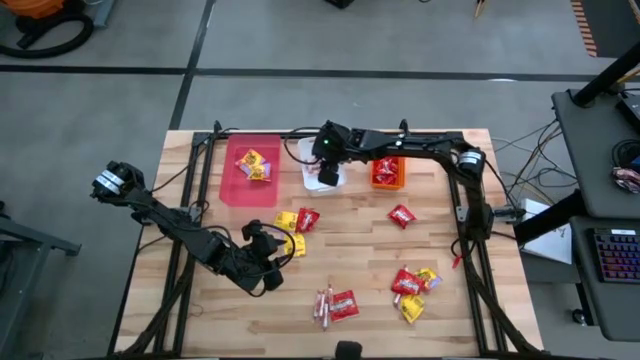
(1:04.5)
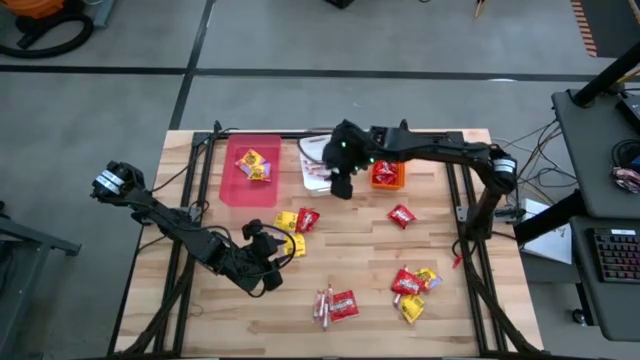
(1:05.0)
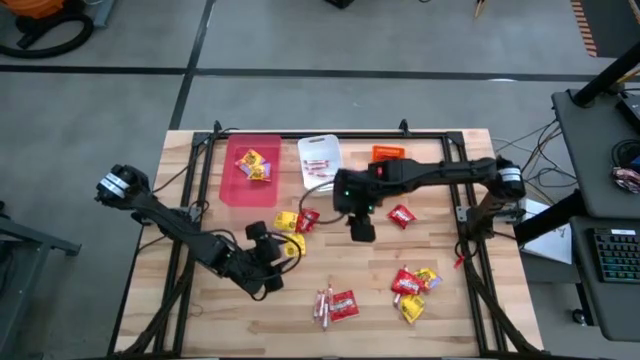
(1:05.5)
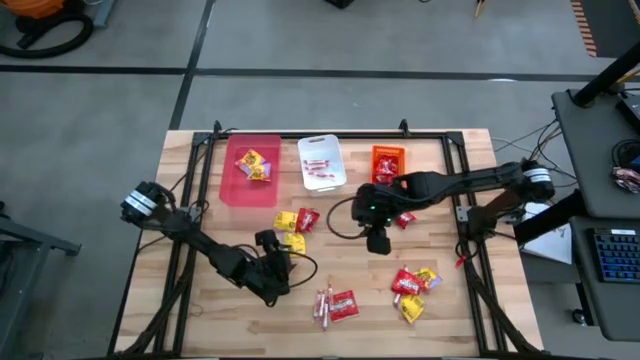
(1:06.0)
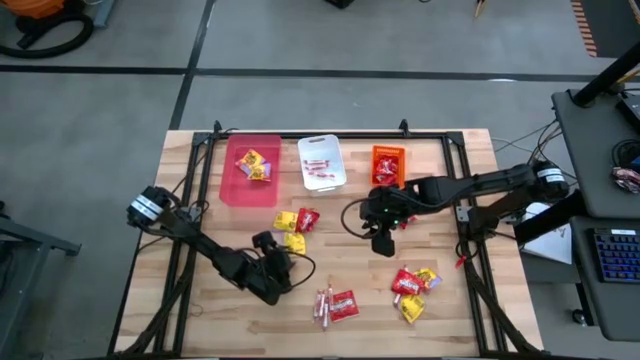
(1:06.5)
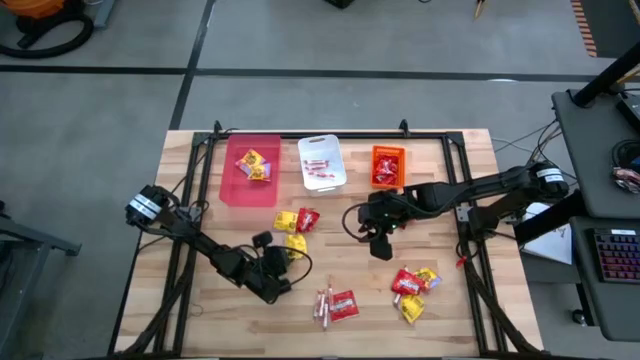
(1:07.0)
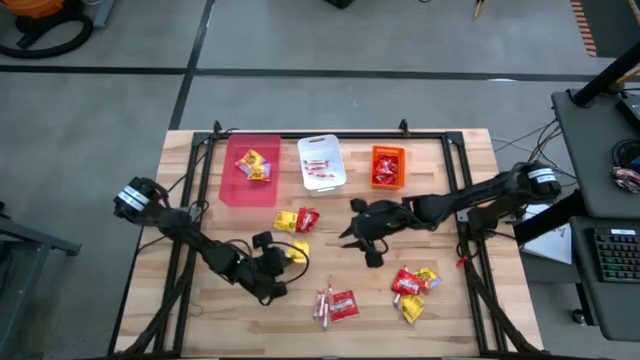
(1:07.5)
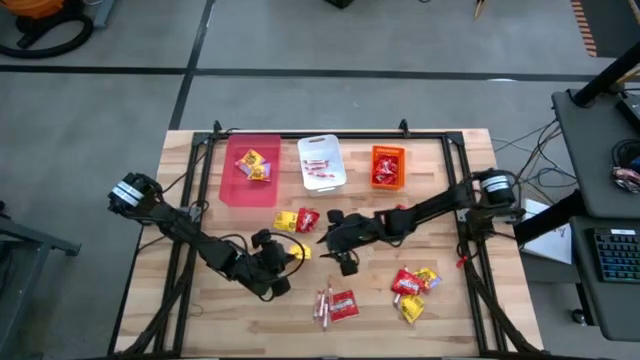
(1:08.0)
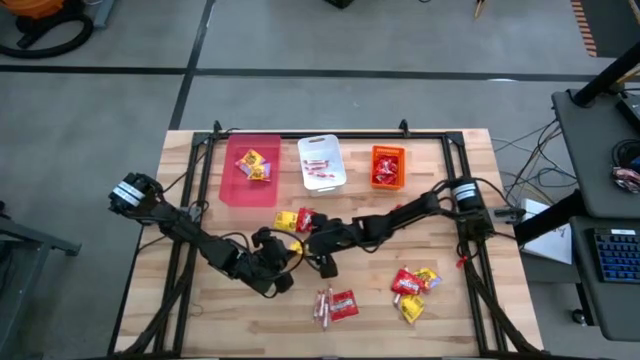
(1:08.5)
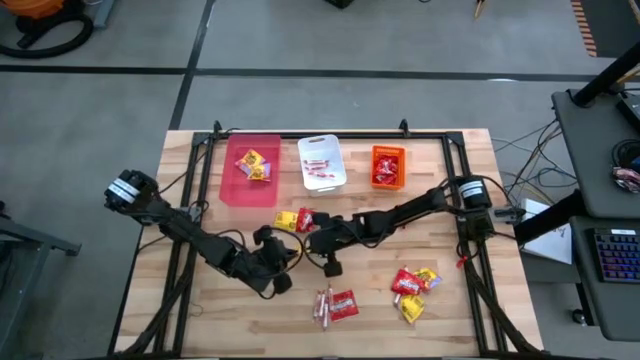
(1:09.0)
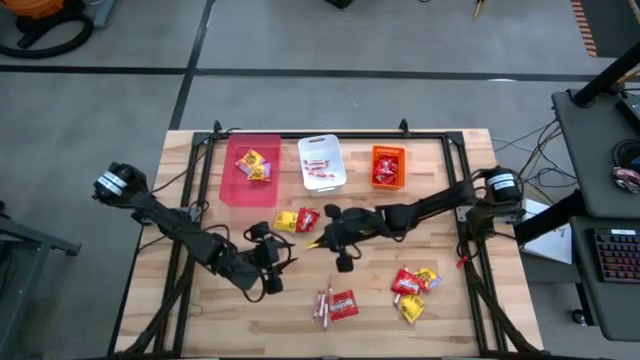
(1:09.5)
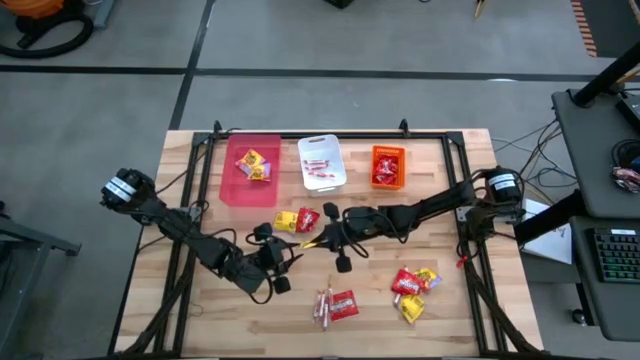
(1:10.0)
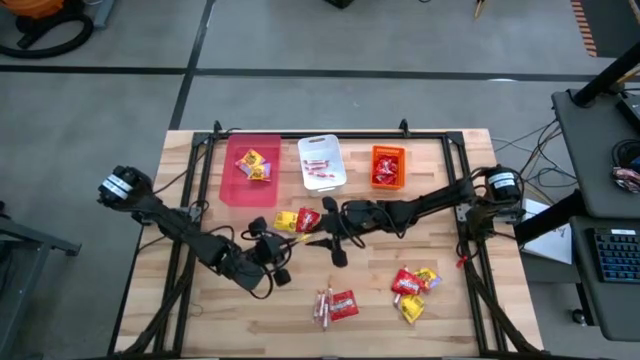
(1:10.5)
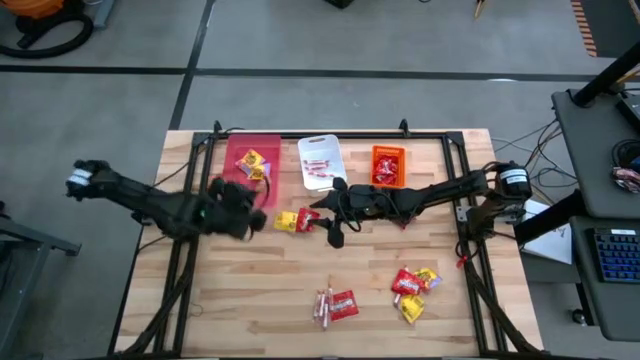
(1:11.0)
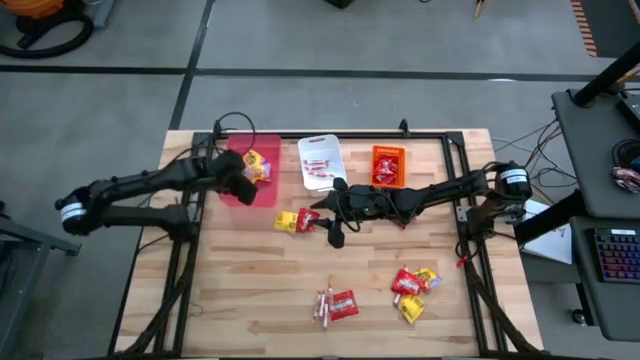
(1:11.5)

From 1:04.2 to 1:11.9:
Task: Sort candy
Put the yellow candy into the pink bin

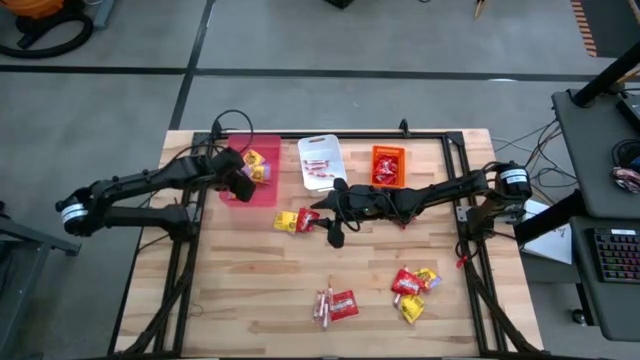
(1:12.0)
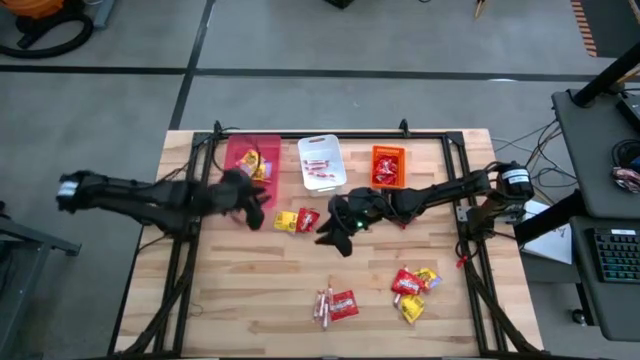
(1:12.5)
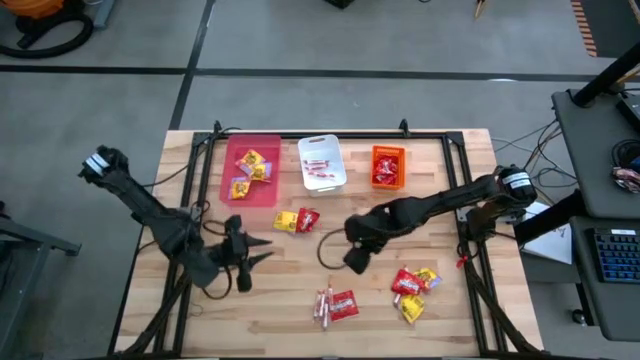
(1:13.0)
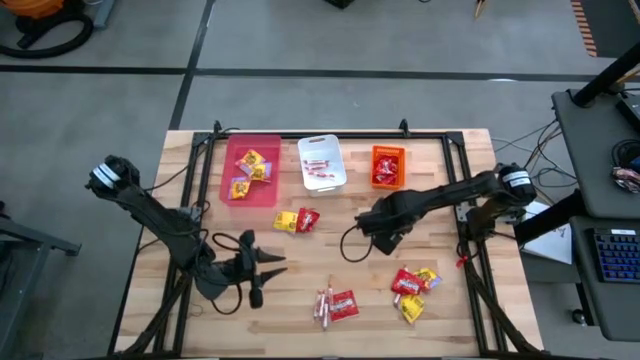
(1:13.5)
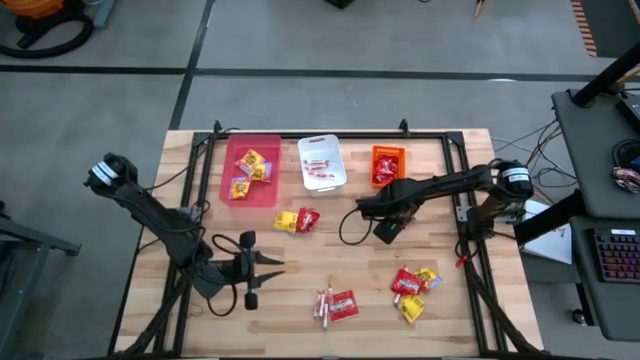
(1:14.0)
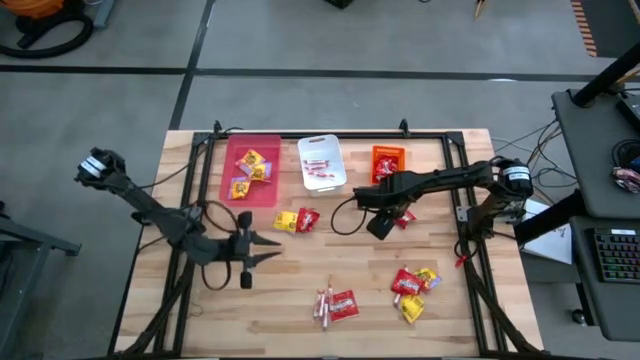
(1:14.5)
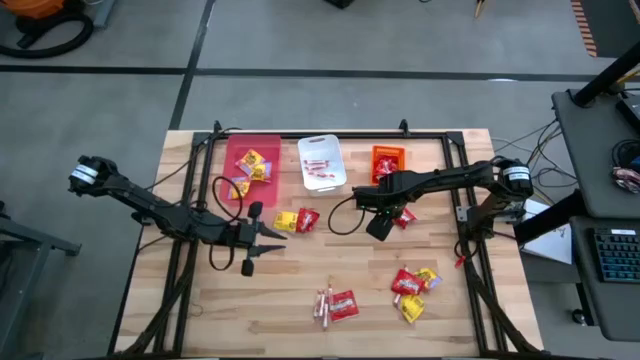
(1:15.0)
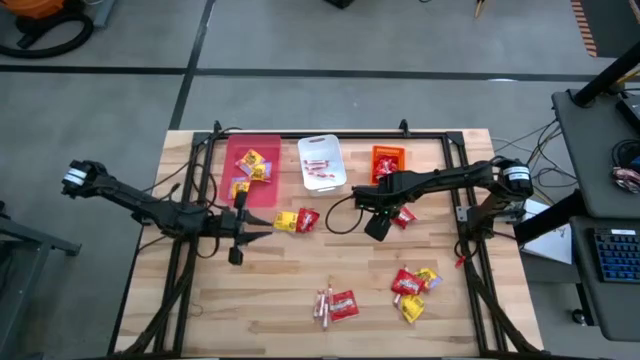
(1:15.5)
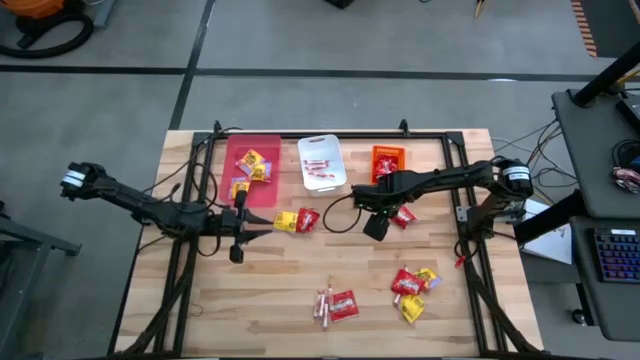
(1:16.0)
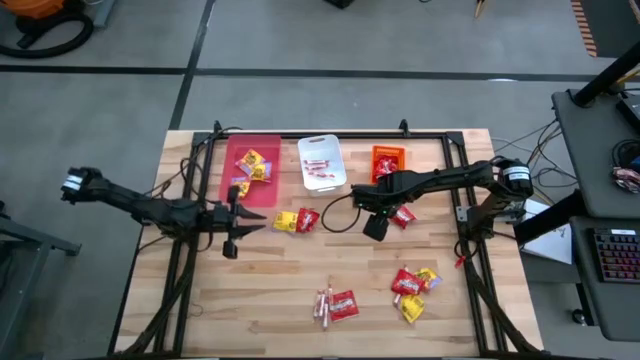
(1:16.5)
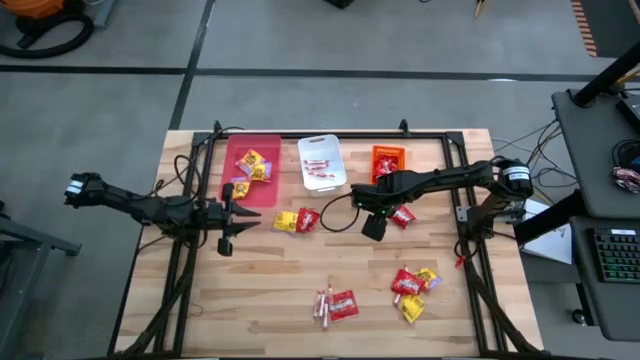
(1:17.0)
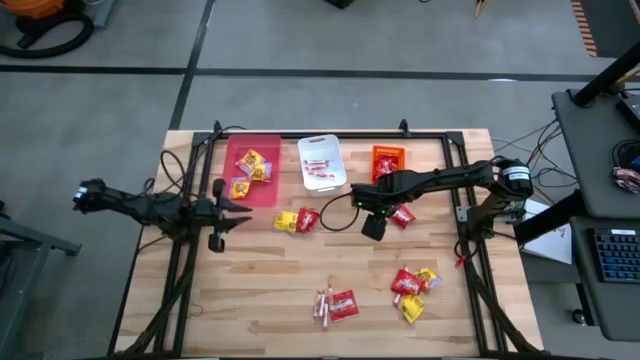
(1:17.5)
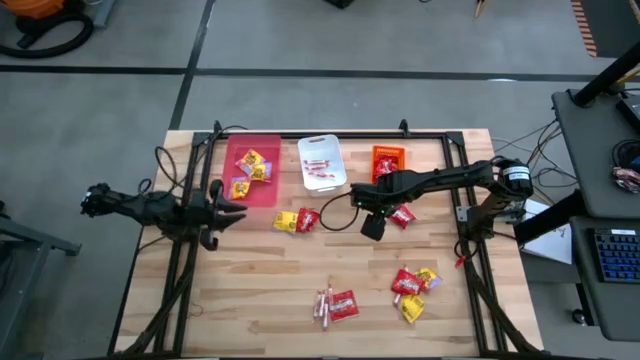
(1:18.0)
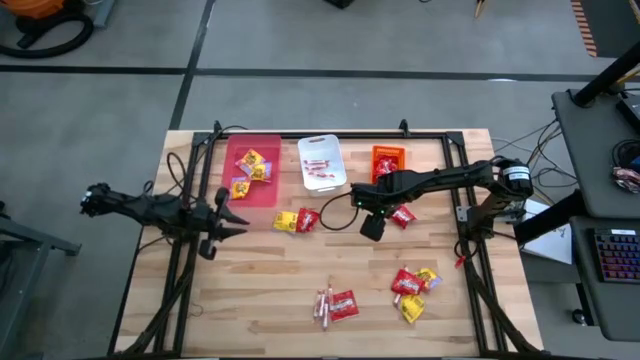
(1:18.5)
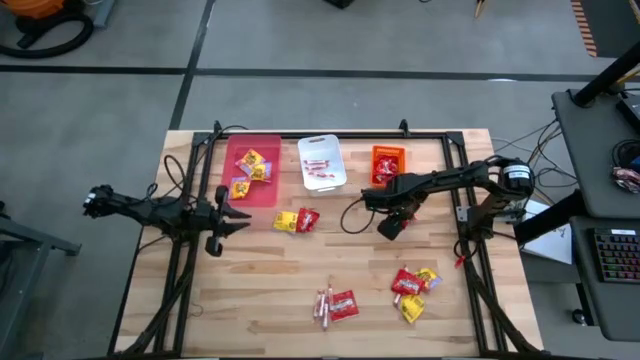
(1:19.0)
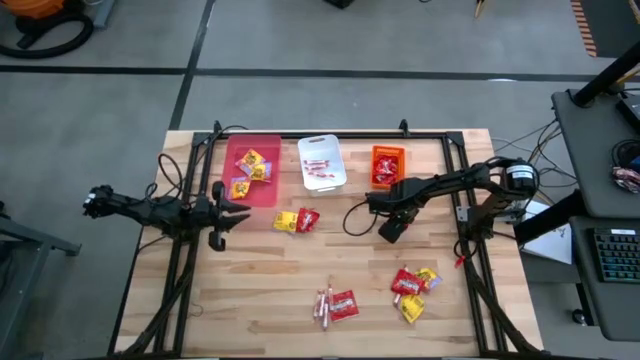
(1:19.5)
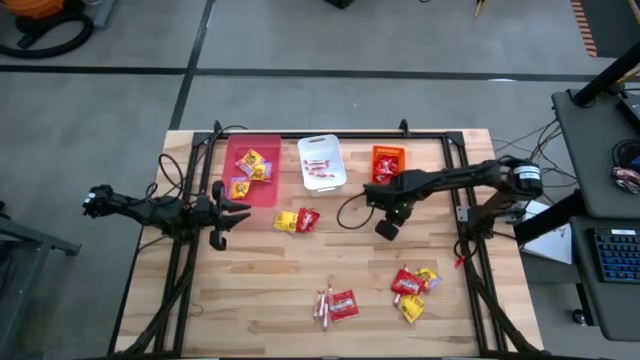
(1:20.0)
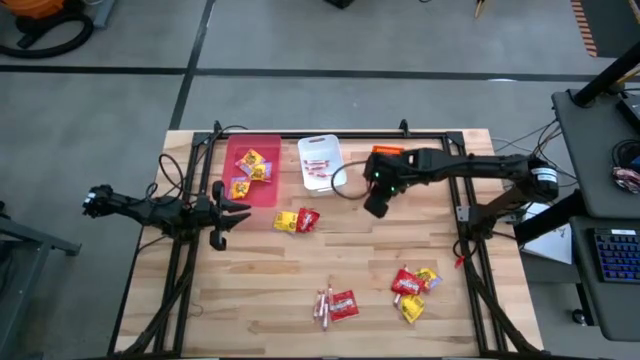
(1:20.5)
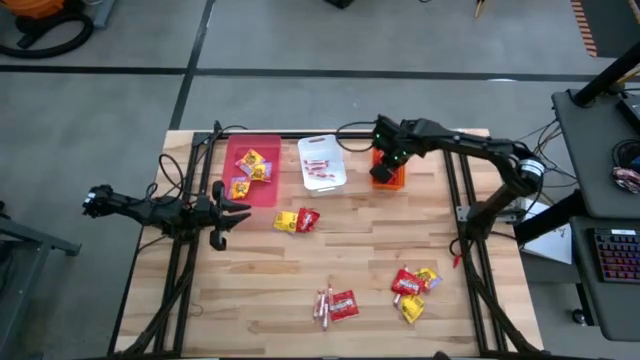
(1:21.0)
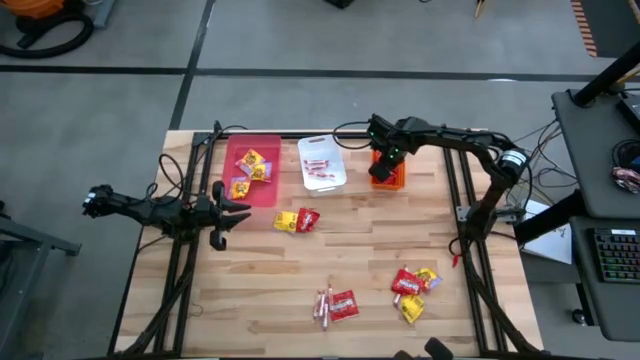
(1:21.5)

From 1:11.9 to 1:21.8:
Put the red candy into the orange bin

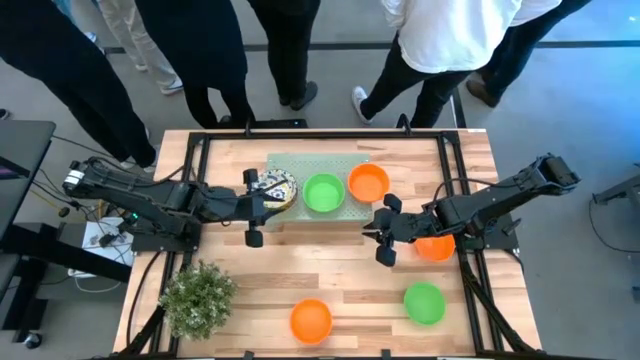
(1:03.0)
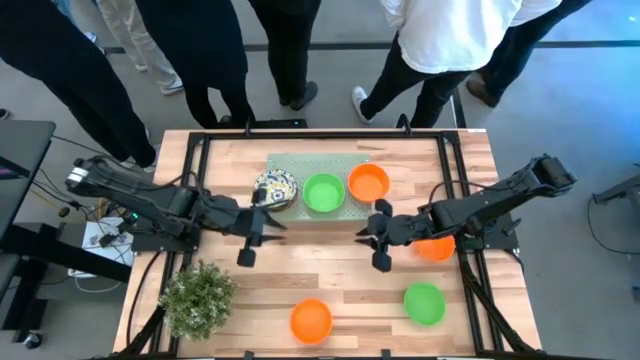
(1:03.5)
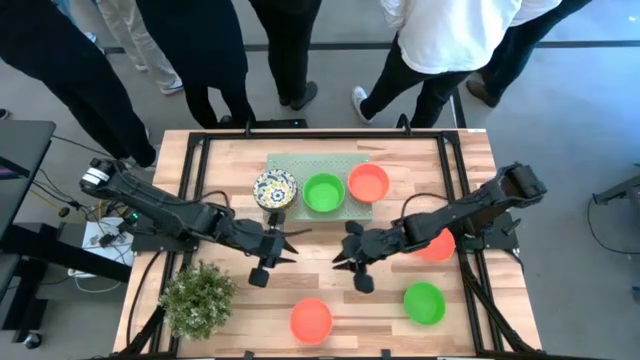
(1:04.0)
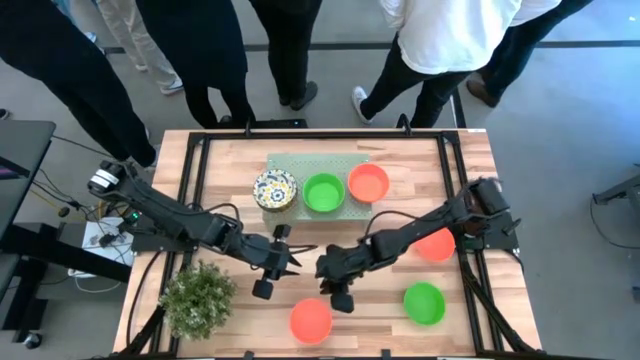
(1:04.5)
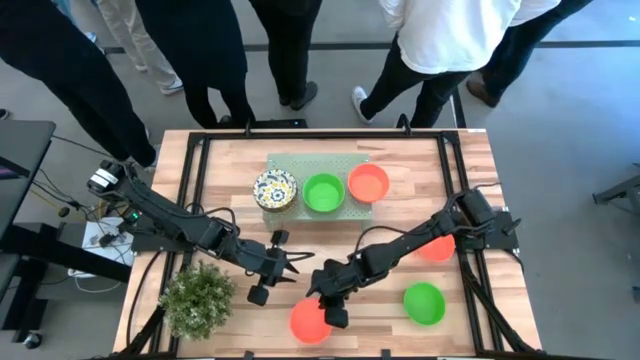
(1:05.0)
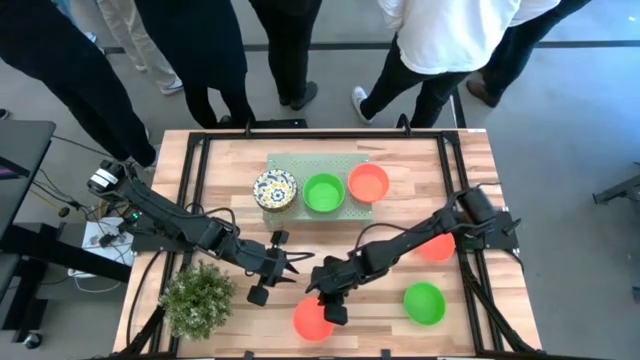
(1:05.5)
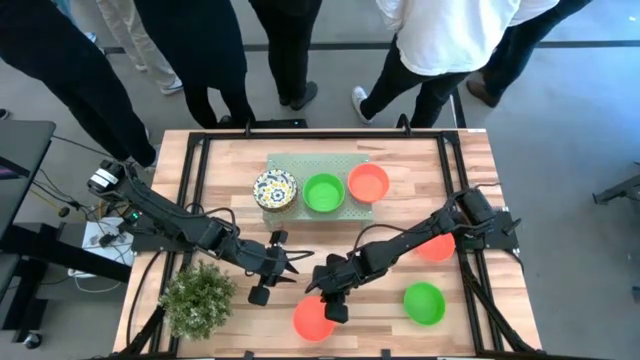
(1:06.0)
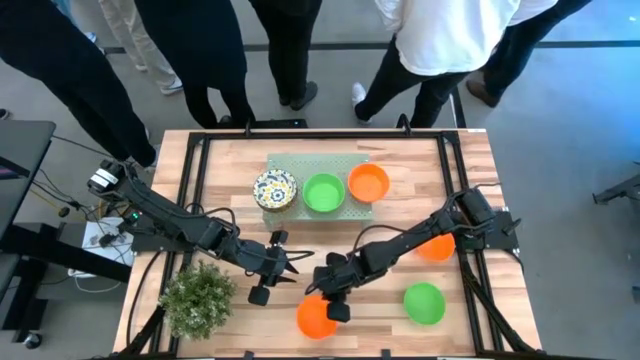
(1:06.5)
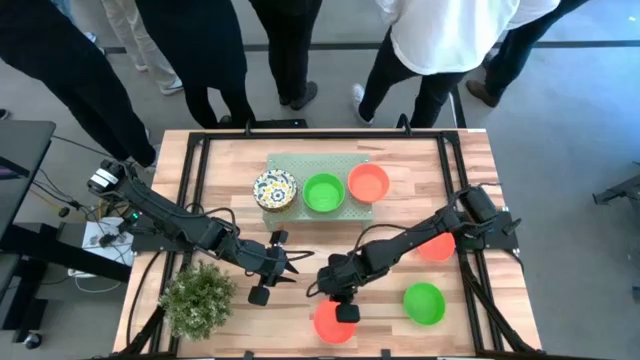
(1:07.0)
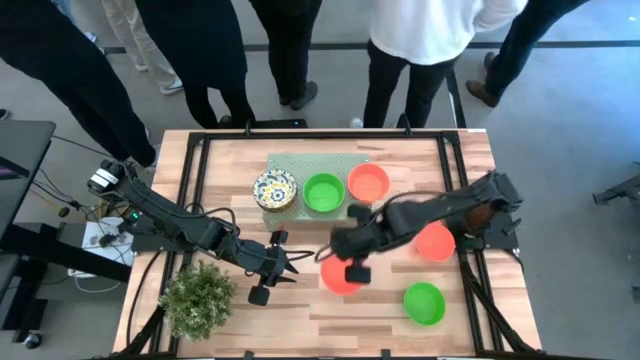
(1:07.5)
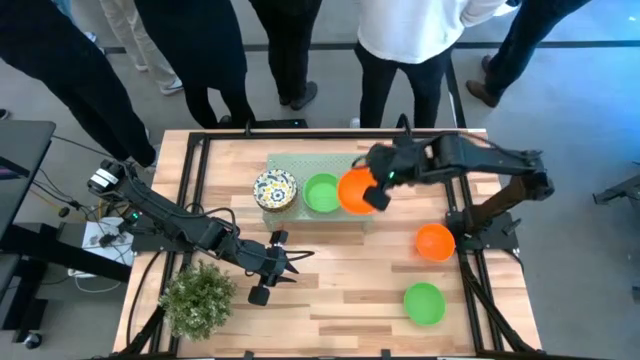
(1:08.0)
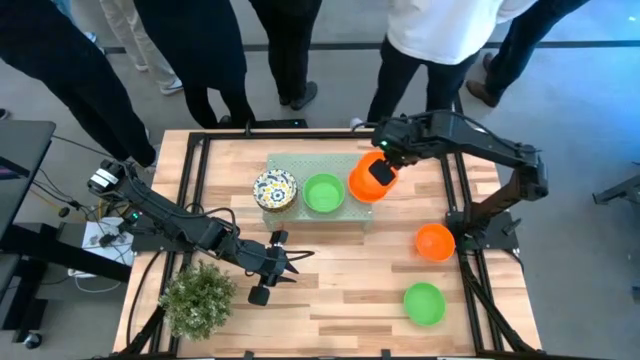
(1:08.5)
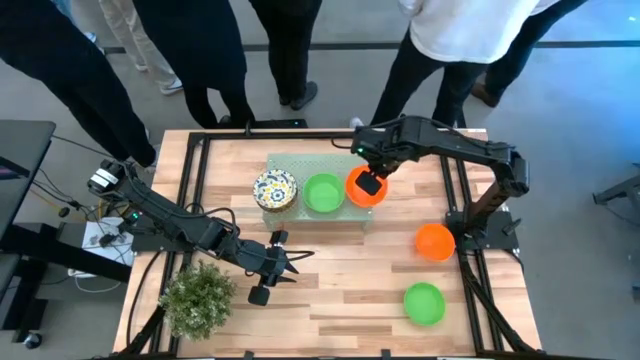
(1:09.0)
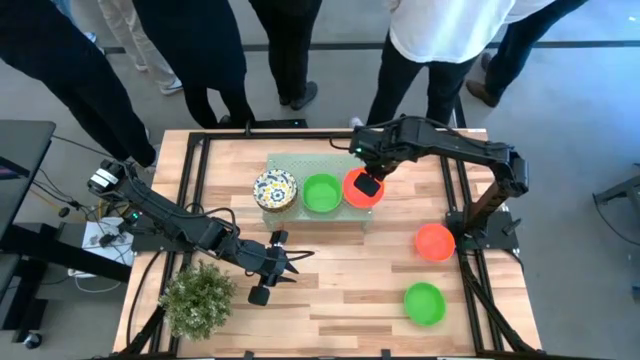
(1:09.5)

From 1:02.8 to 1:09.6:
Task: Pick & Place Mini bowls
Stack the orange bowl on top of the orange bowl on the shelf
